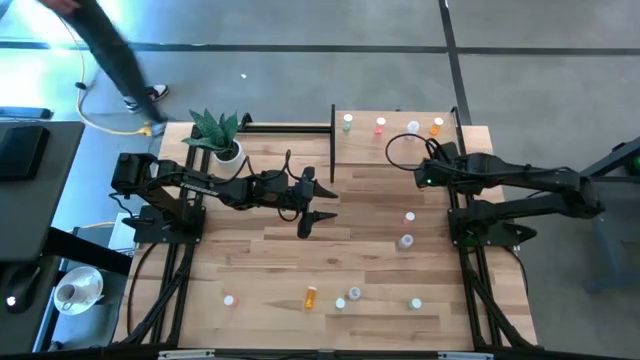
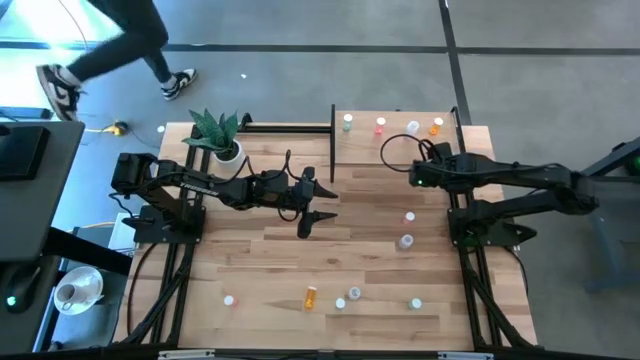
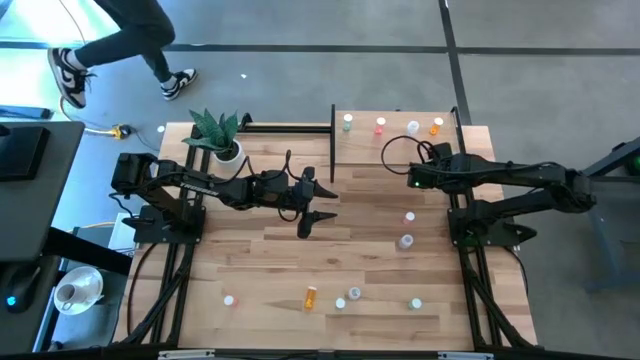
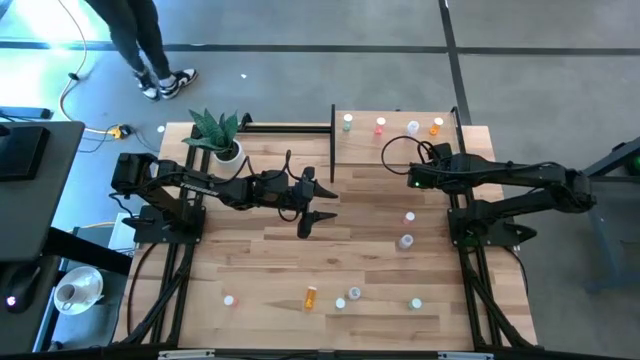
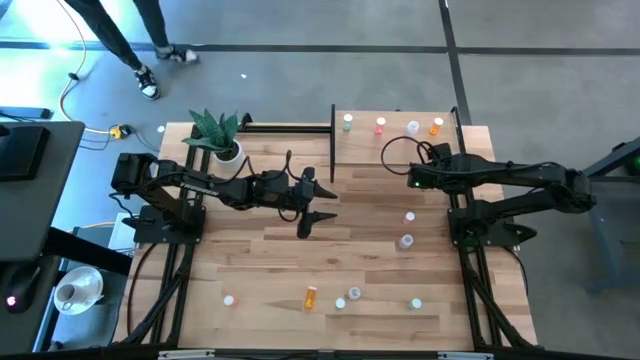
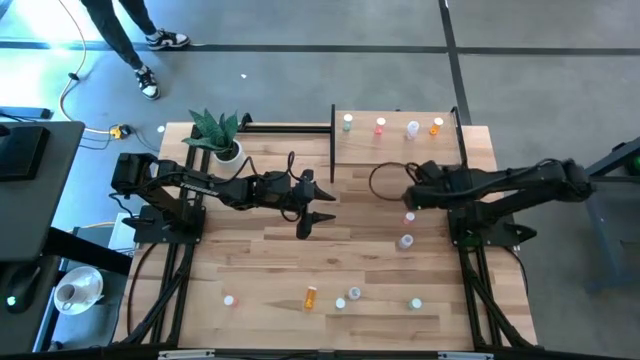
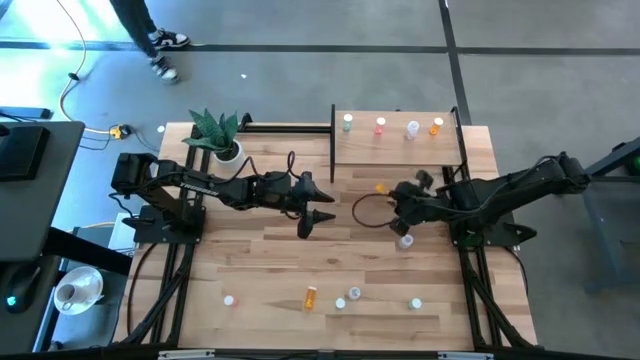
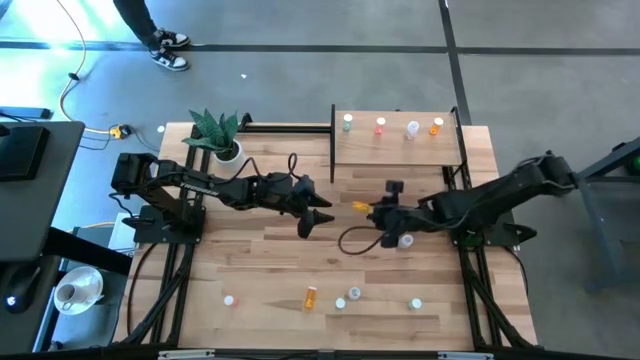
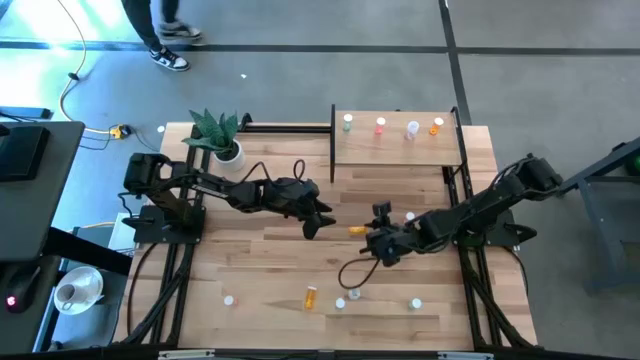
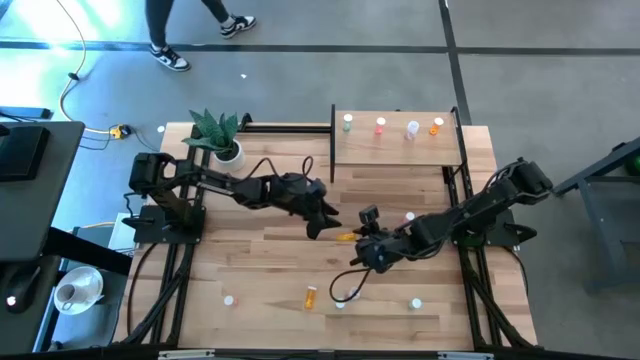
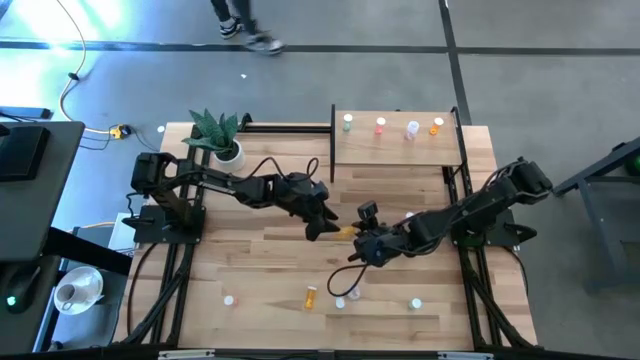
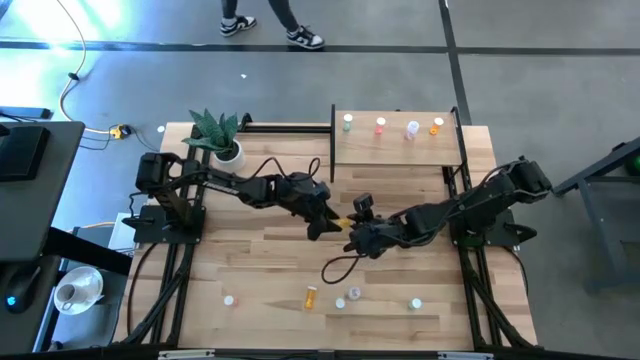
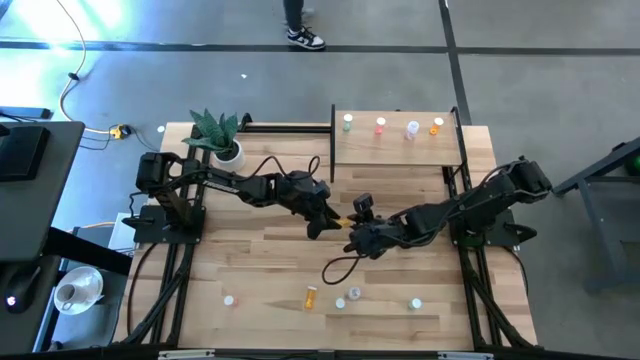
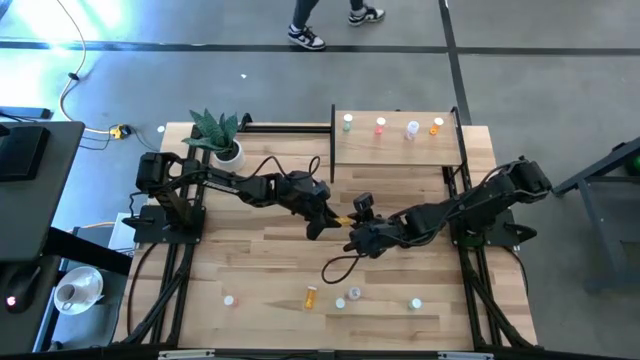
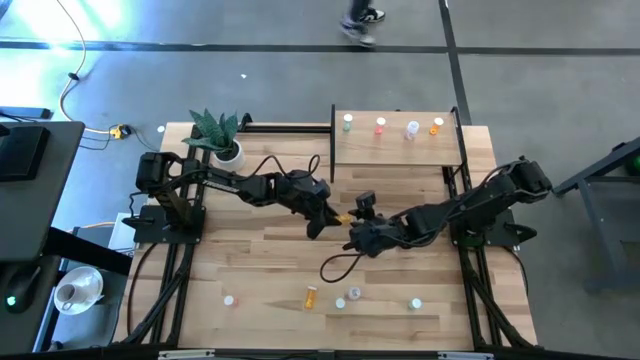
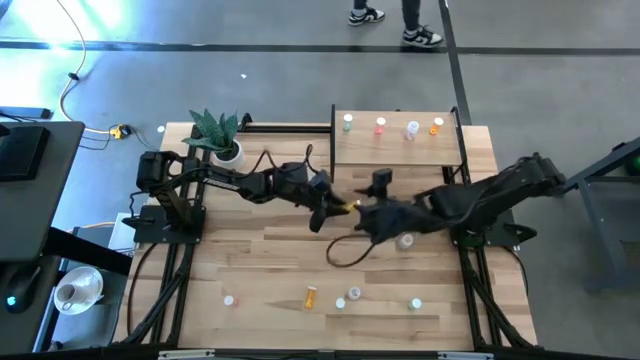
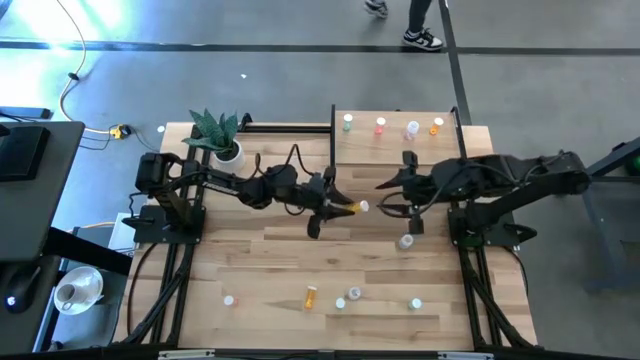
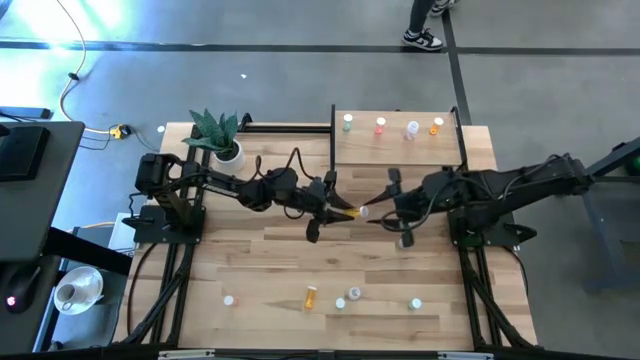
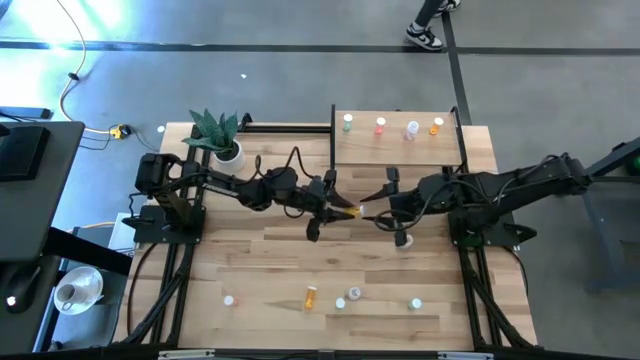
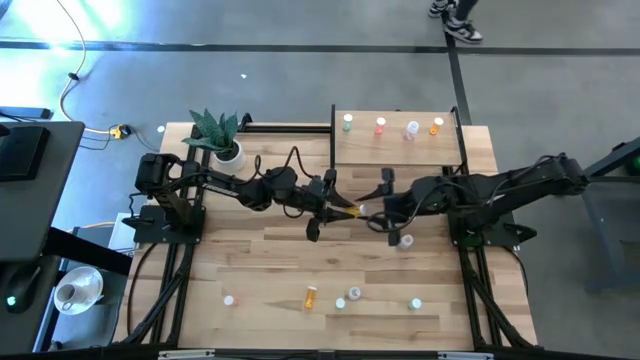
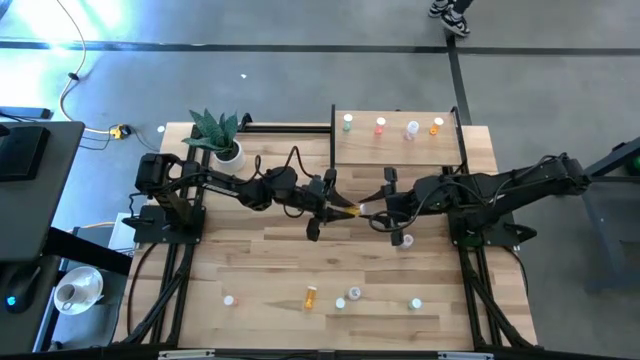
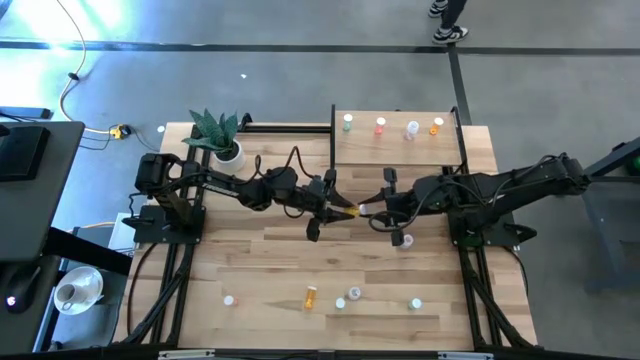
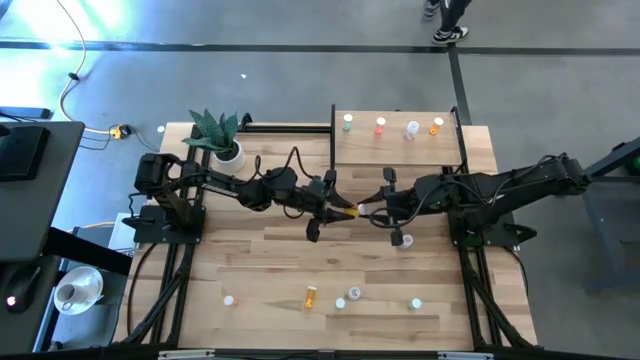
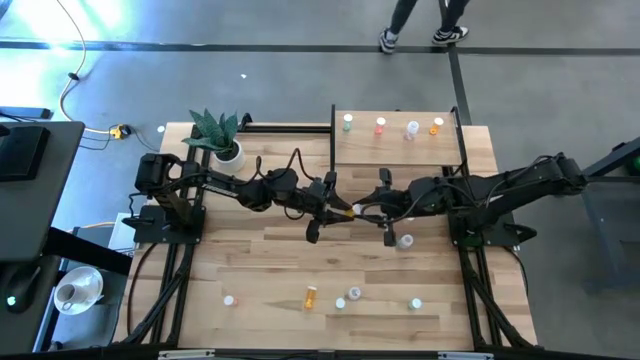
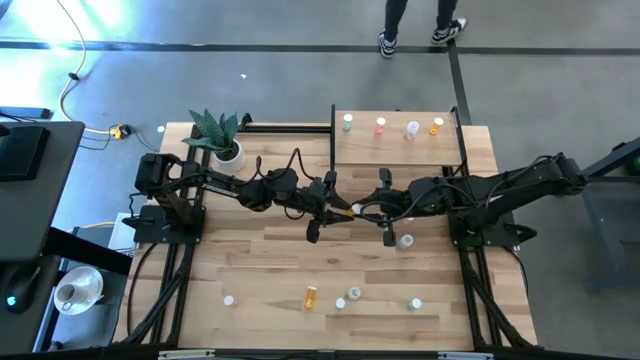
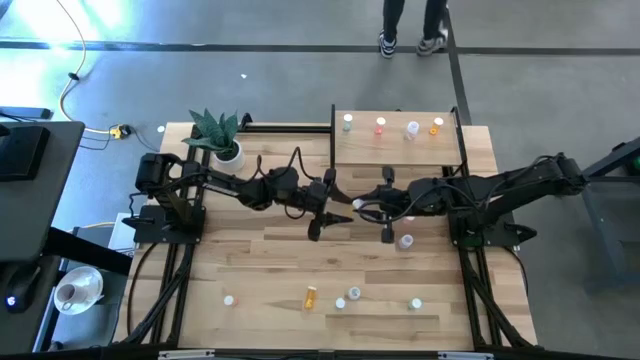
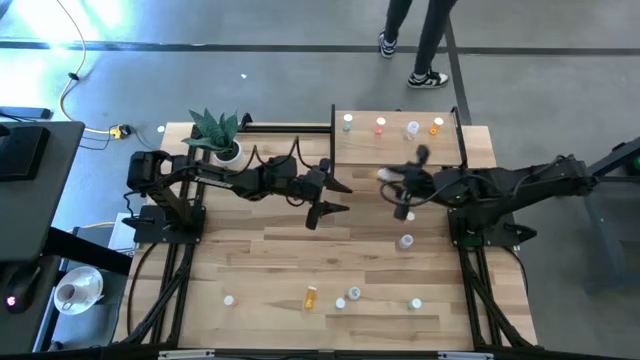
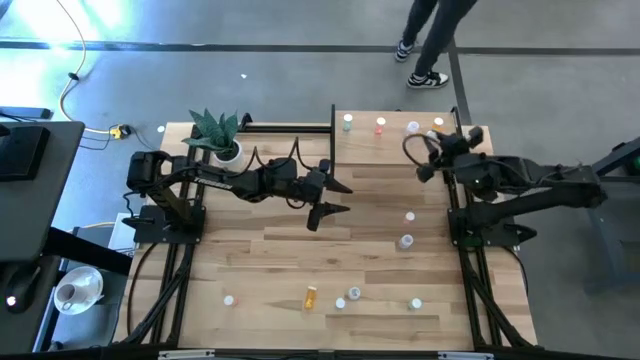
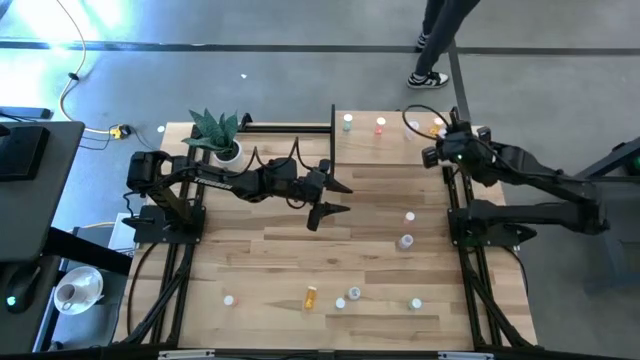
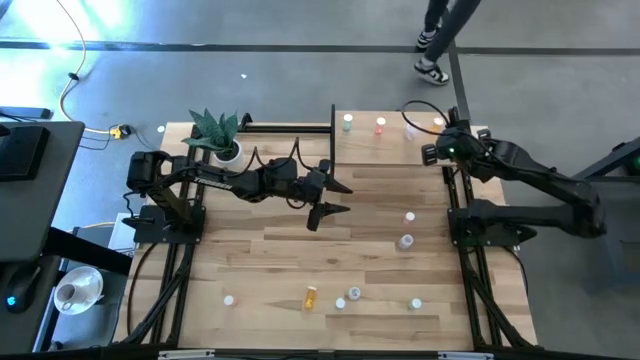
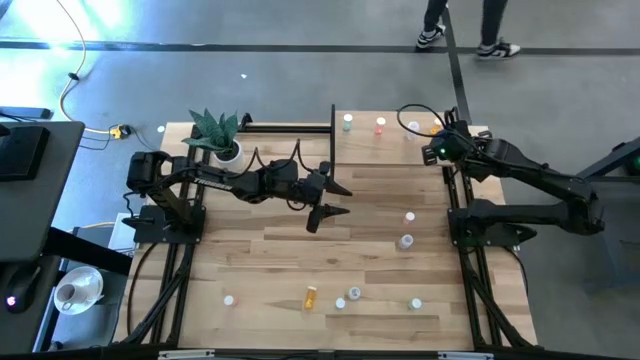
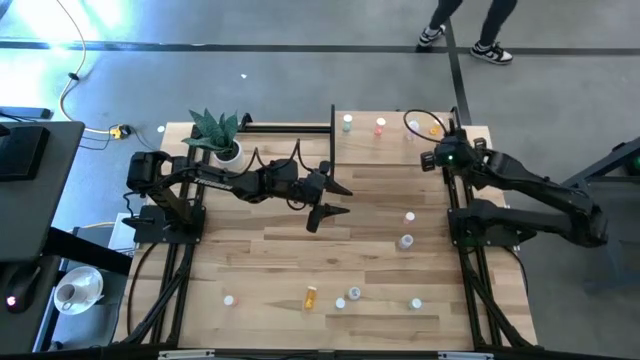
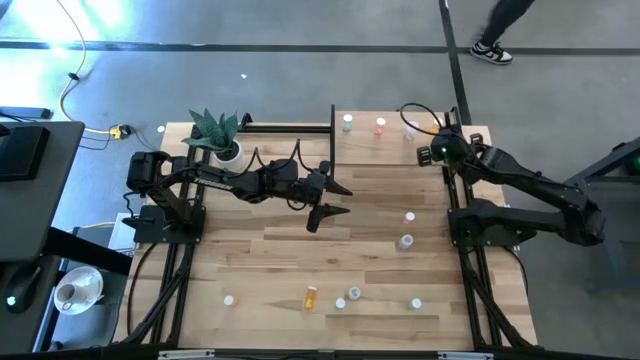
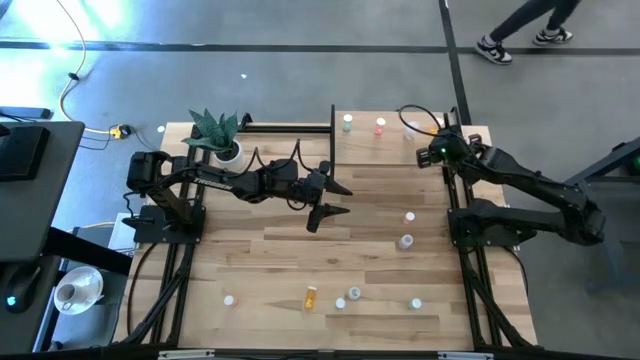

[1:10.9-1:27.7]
Task: Pick and place medicine bottles onto shelf by color
Put the top yellow pill bottle on the shelf aligned with the other yellow pill bottle

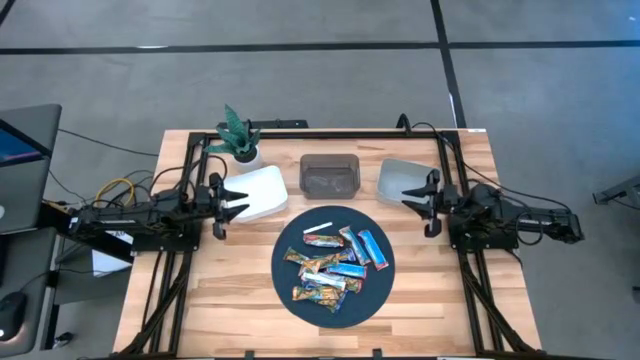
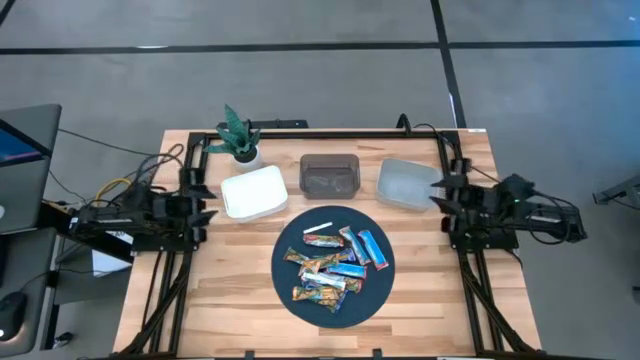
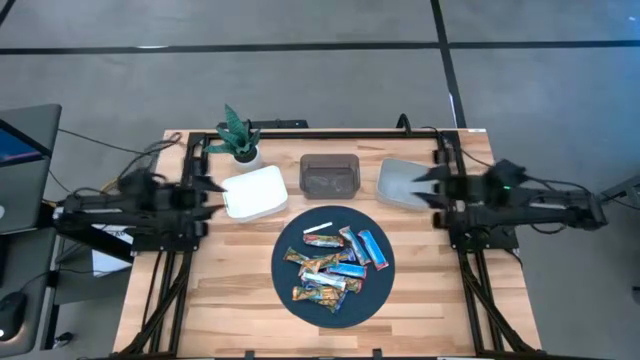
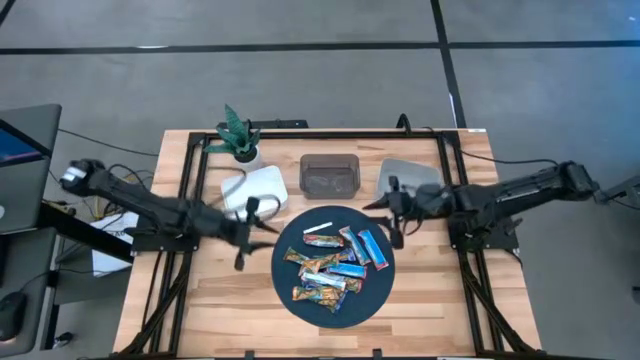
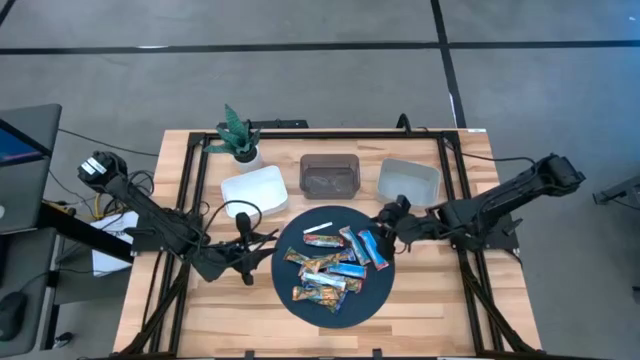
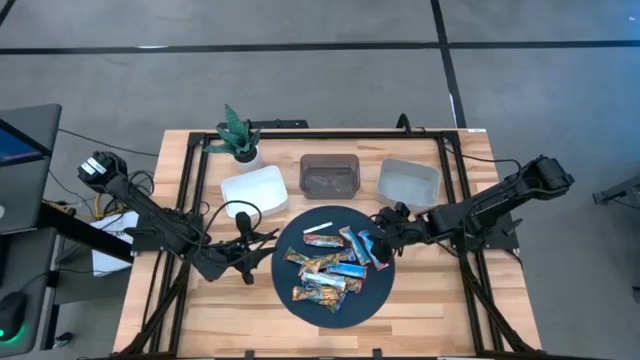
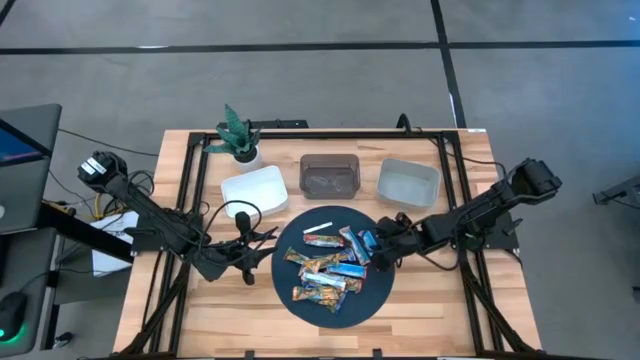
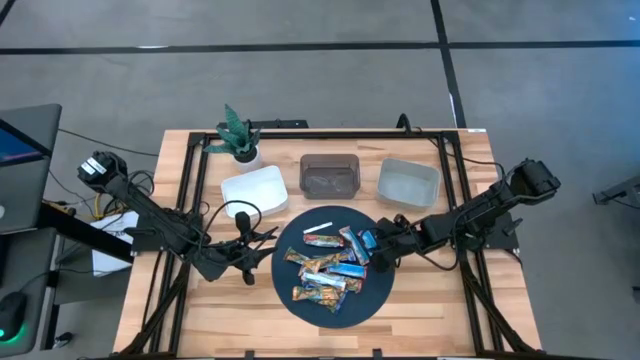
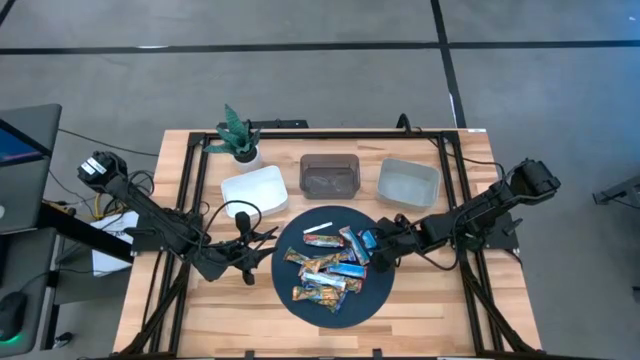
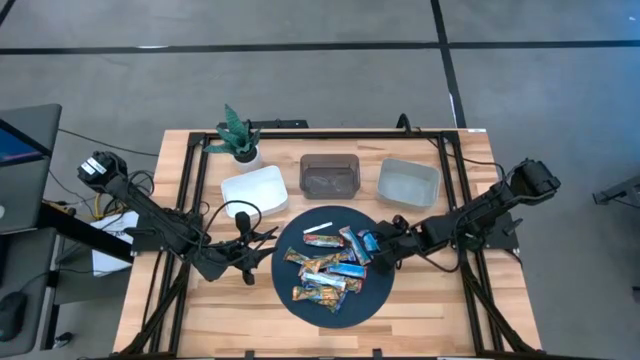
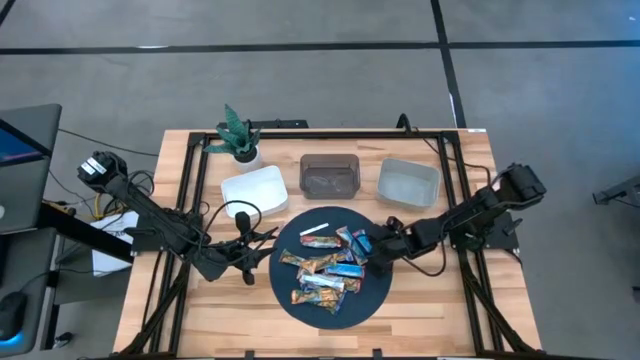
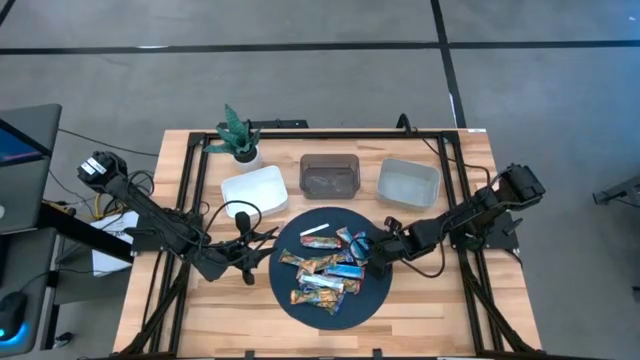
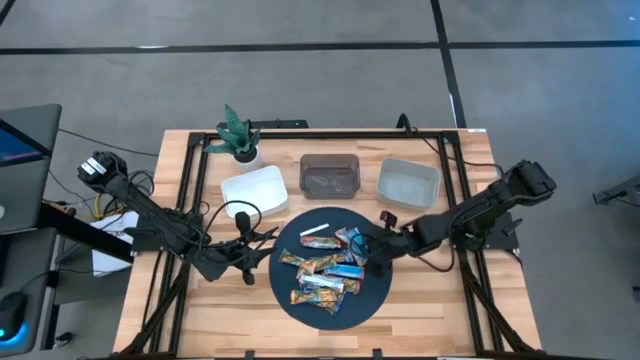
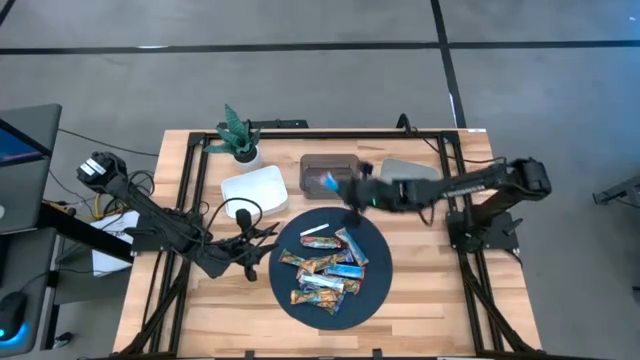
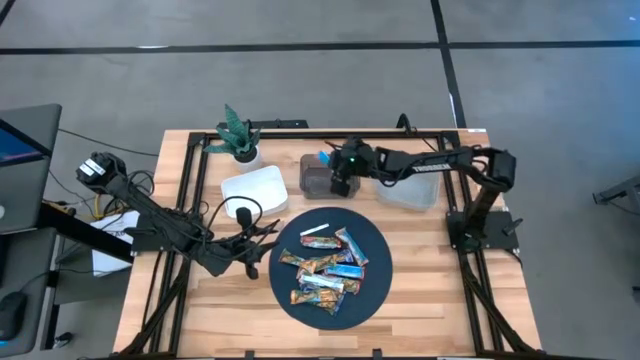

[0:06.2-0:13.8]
Task: Pick and place Granola Bars by type
Put the red granola bar into the black bin
